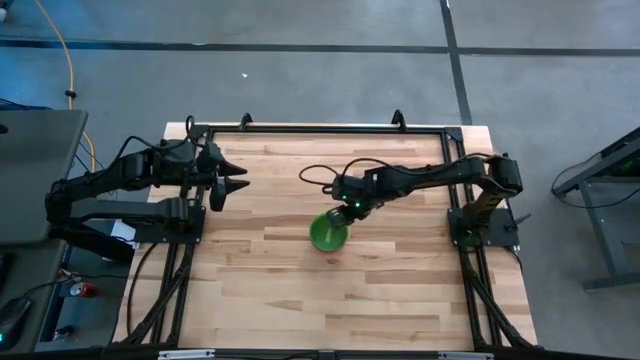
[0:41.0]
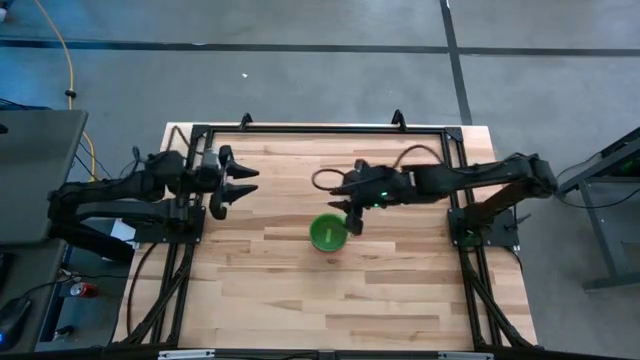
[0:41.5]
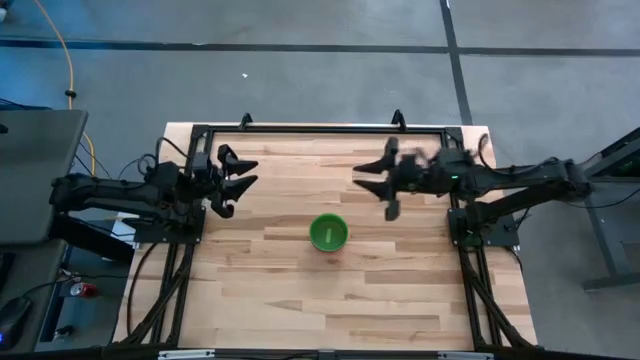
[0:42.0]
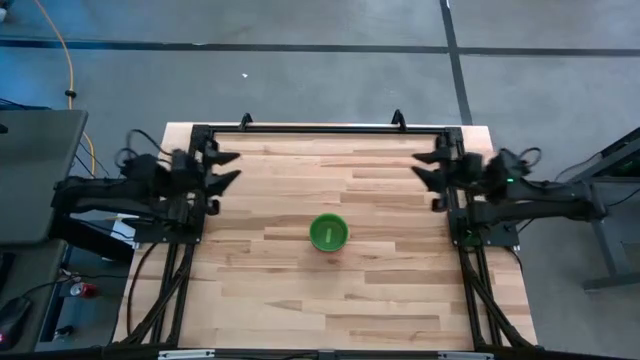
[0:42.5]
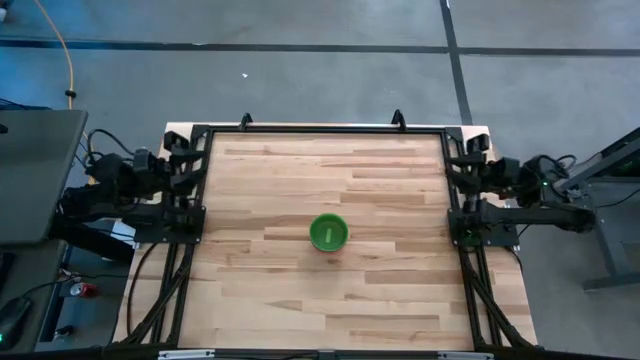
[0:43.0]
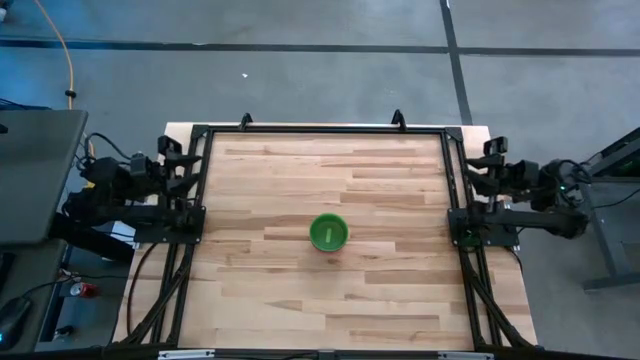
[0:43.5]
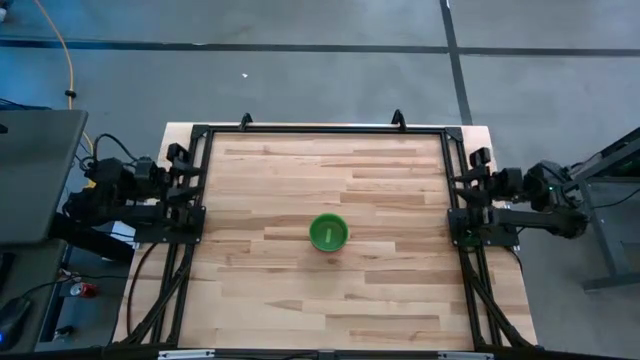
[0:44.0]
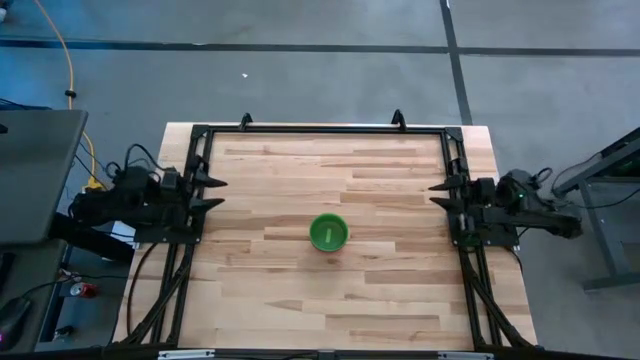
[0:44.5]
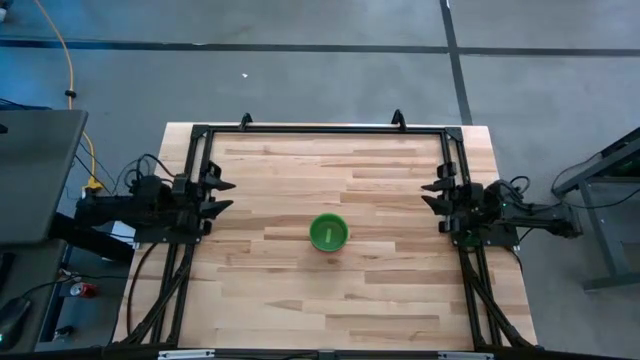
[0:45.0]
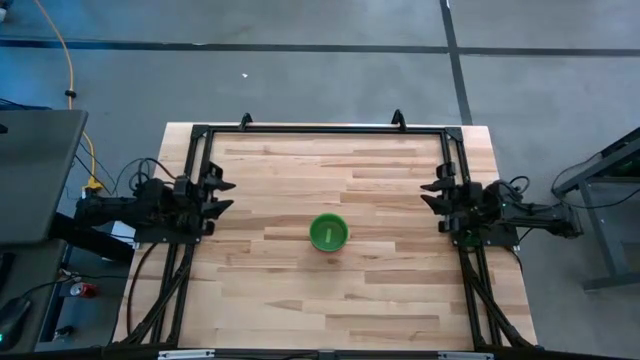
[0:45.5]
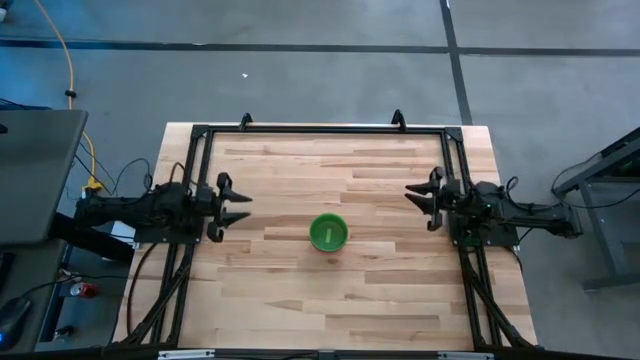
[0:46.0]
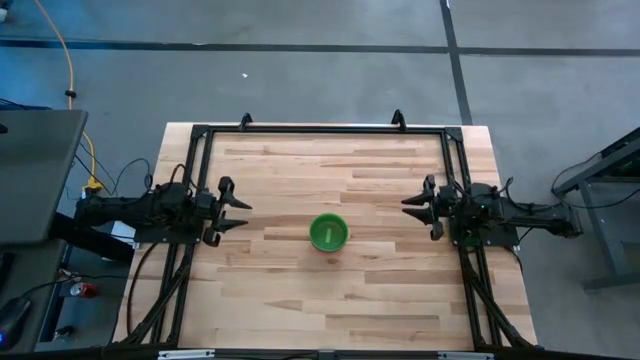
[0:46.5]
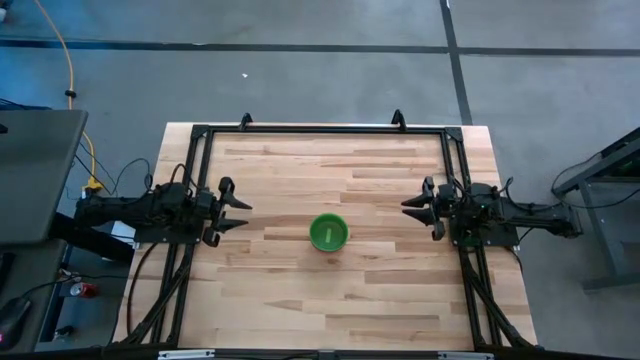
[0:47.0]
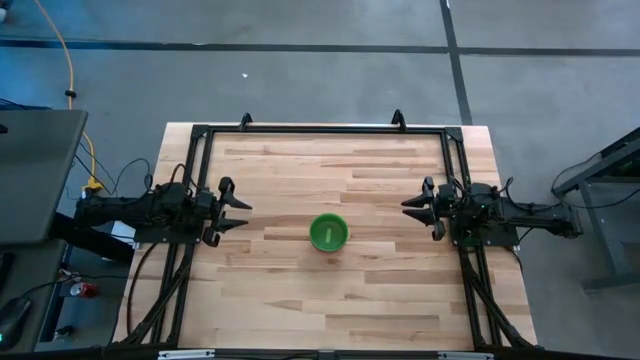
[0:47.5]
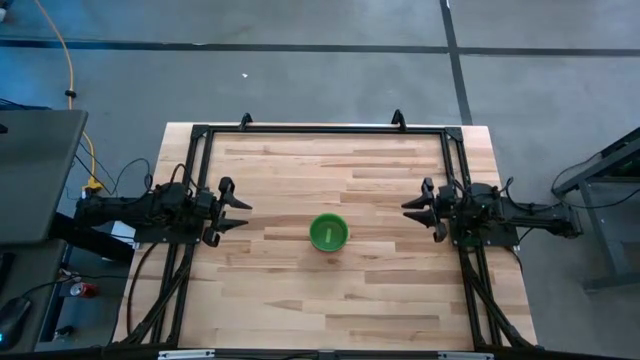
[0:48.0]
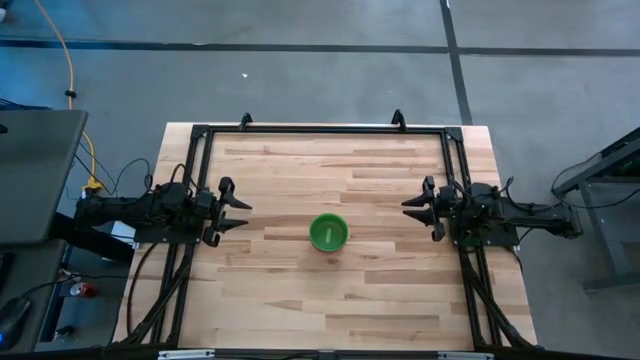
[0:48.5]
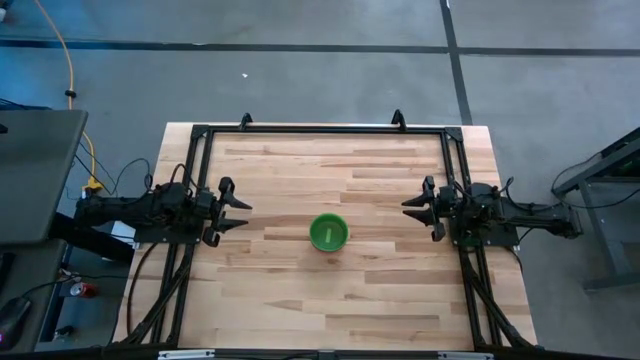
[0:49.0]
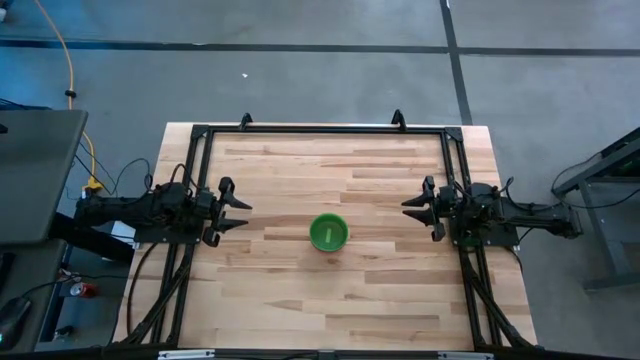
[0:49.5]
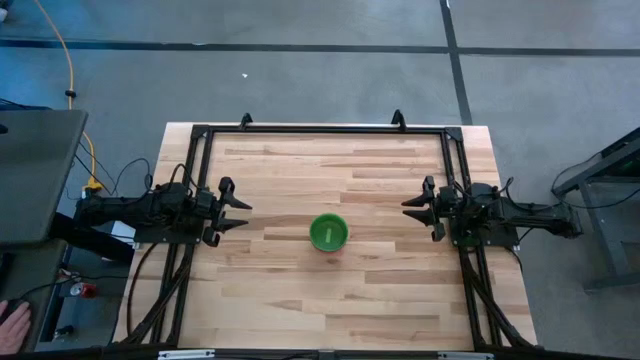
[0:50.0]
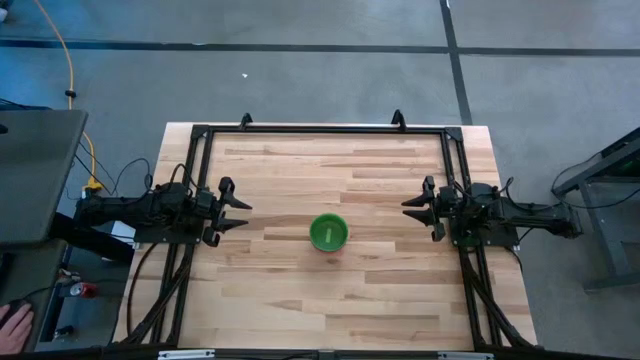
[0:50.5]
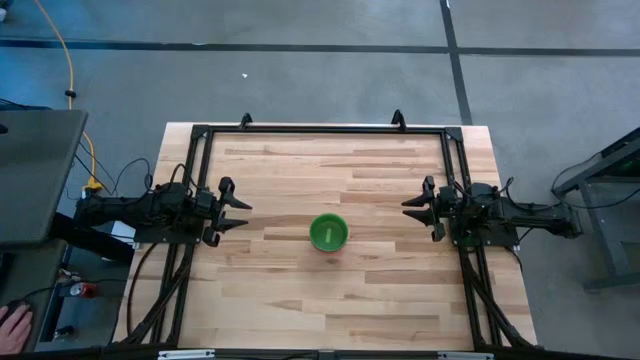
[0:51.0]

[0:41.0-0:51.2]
Task: Nest bowls inside each other
Return to Home Position

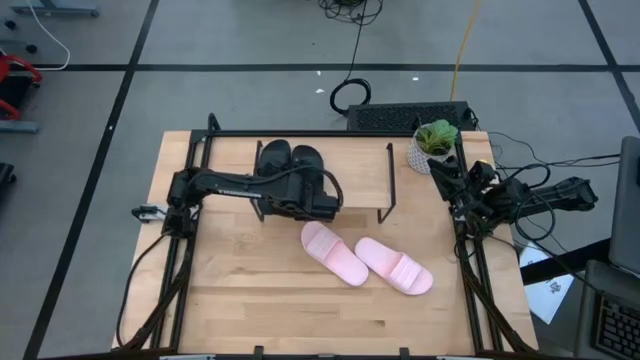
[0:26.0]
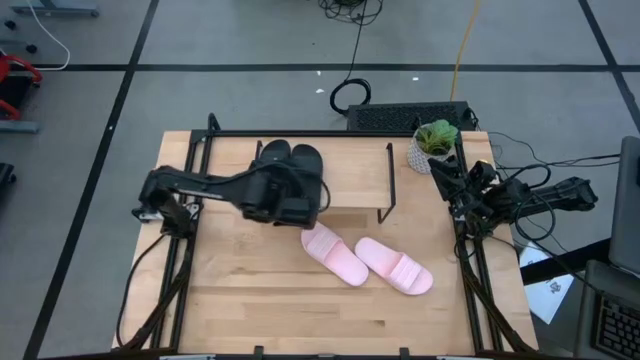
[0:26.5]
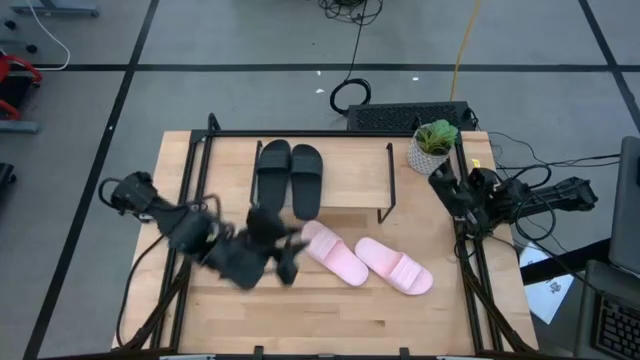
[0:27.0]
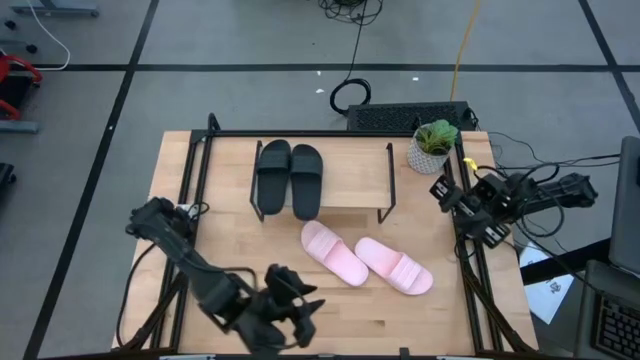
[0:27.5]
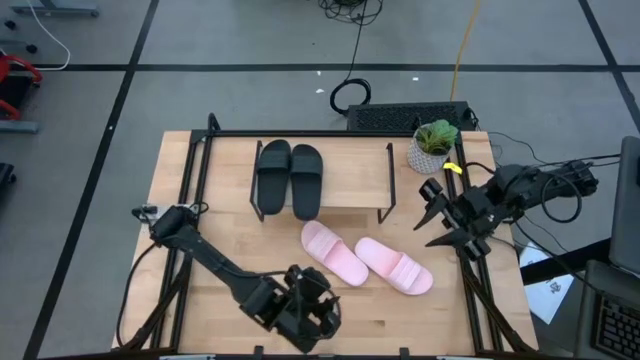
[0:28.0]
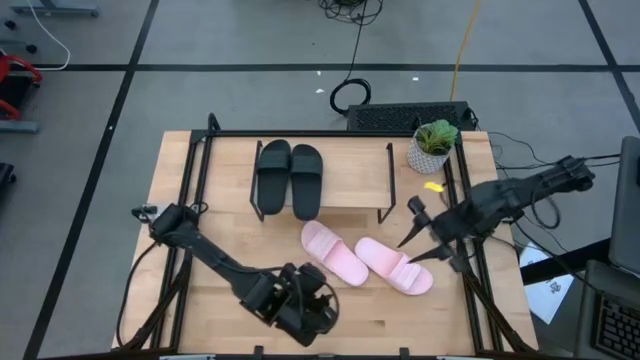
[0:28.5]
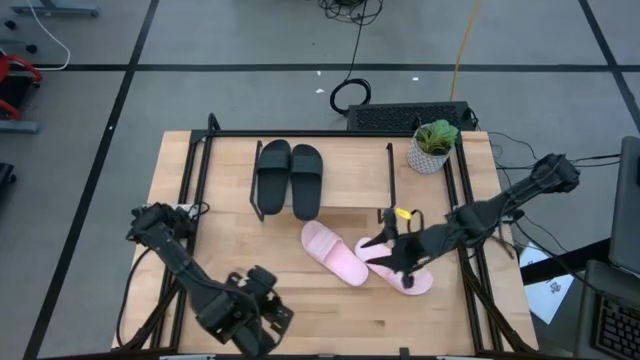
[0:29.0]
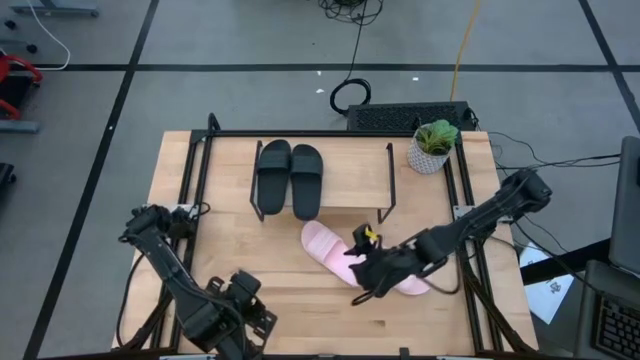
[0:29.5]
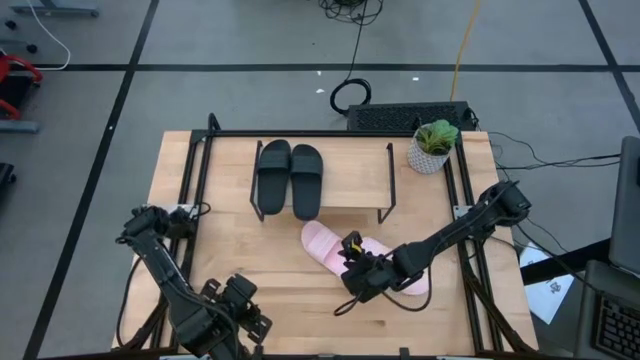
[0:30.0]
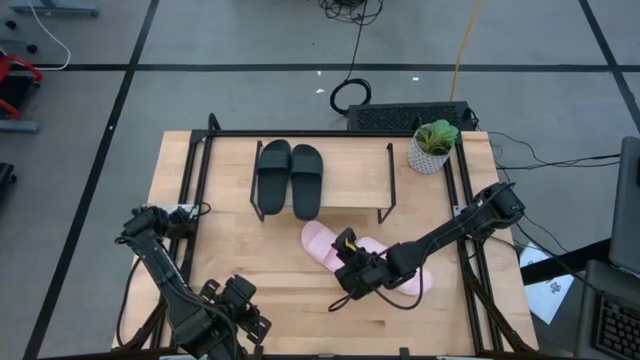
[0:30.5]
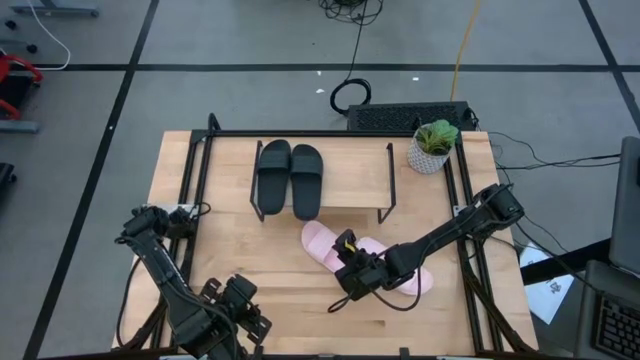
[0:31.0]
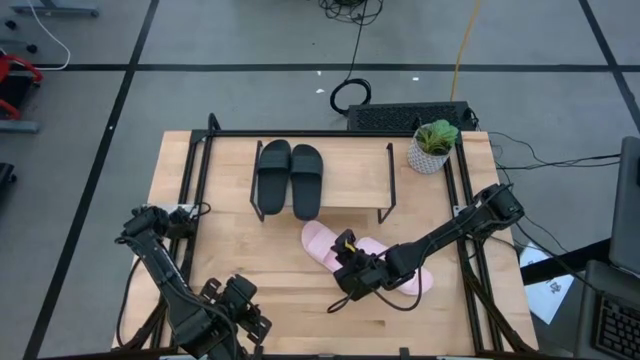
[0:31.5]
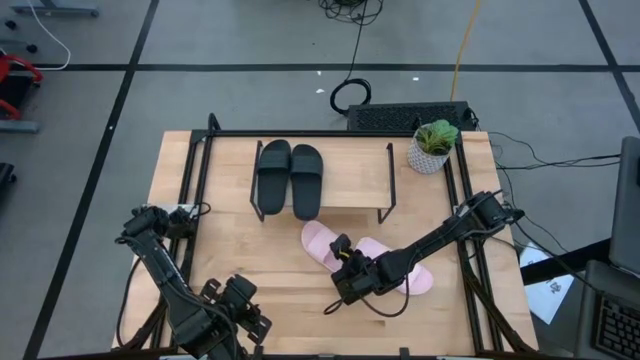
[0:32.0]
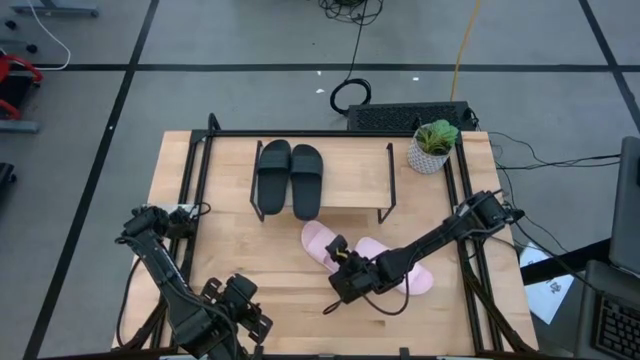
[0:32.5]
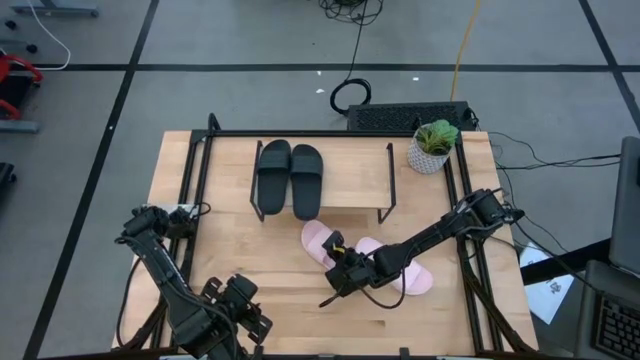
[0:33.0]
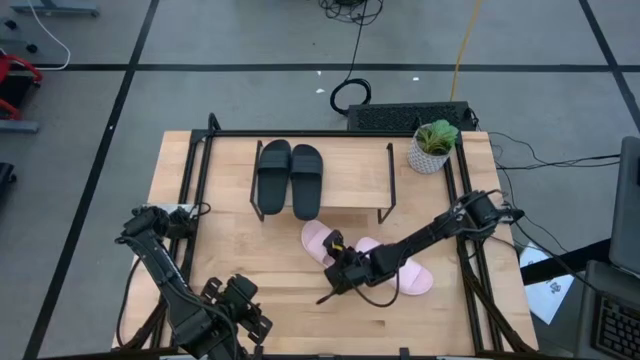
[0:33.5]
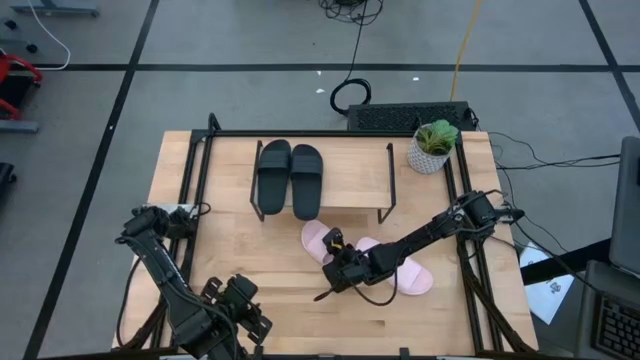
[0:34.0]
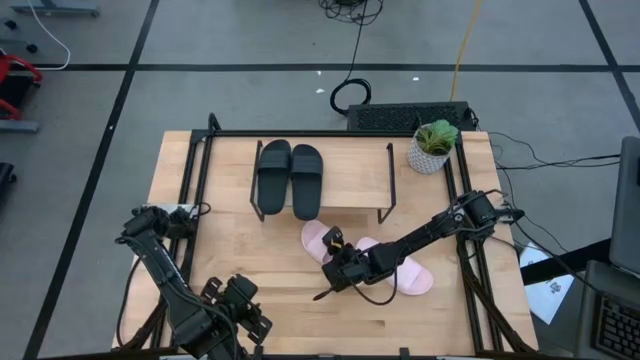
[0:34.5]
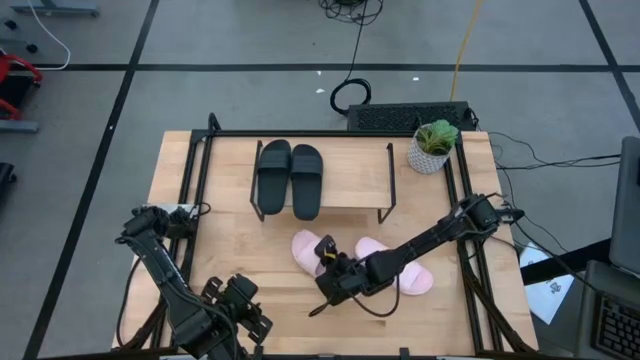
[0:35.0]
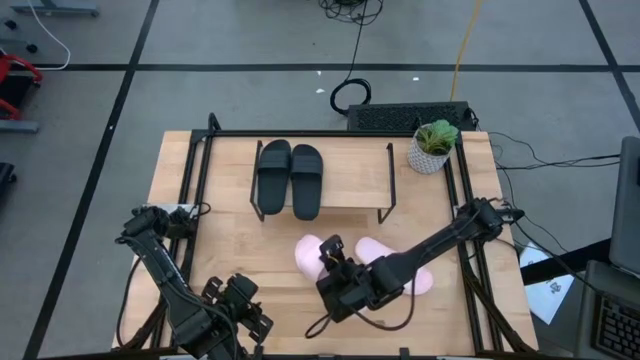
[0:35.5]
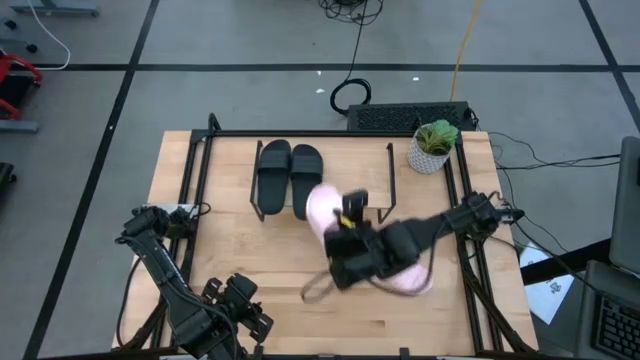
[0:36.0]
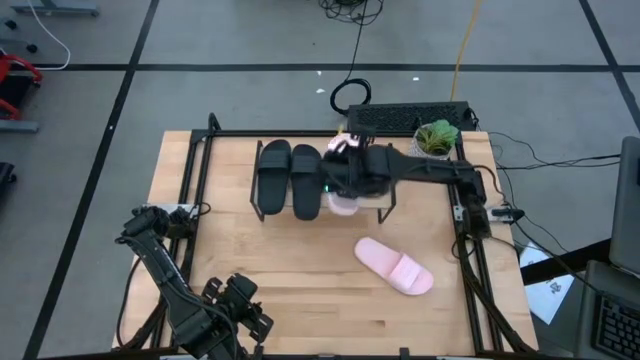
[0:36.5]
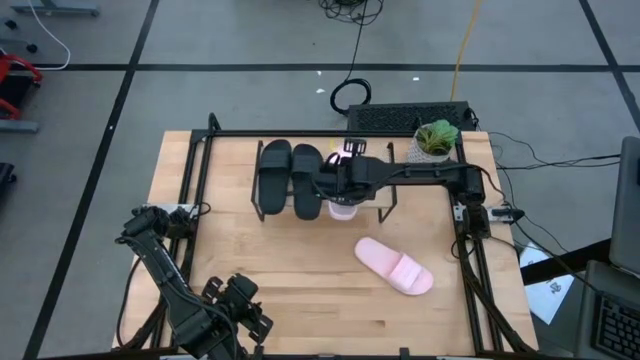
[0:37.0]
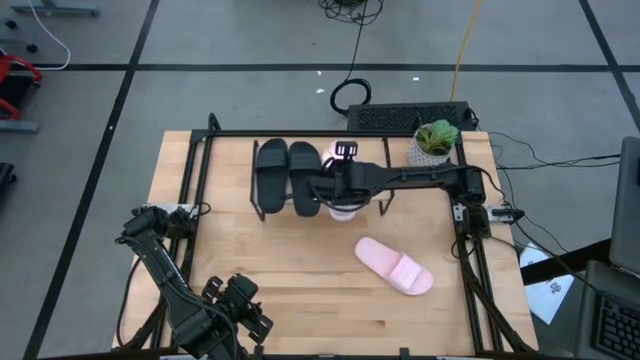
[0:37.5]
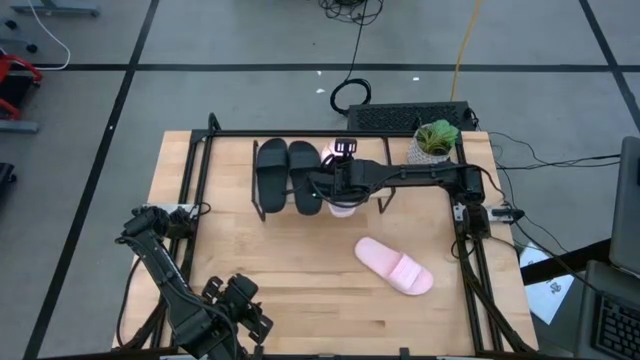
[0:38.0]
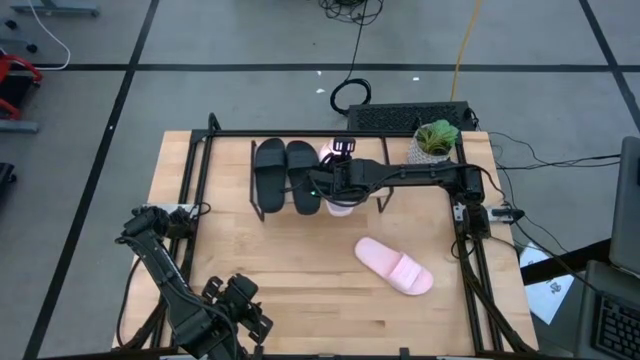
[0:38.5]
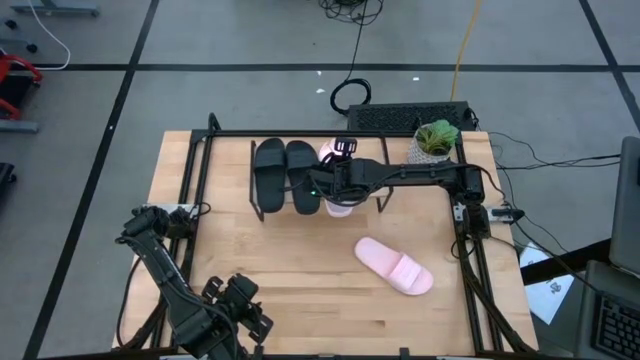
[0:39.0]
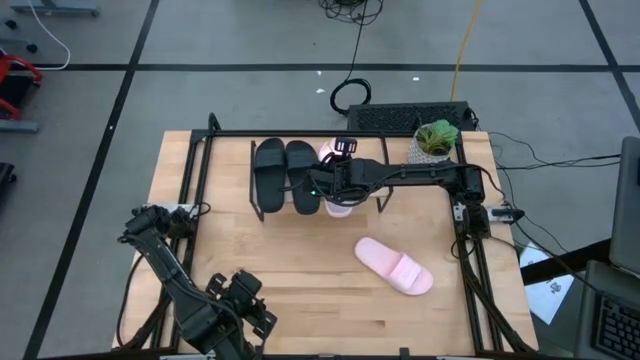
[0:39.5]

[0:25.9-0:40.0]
Task: Pick and place slides into the shelf
Put the left pink slipper onto the shelf
